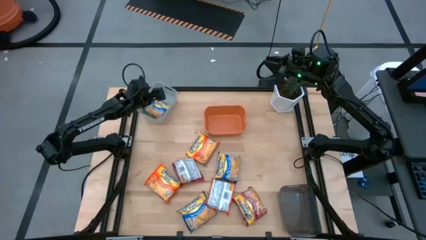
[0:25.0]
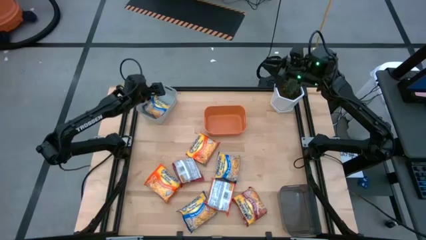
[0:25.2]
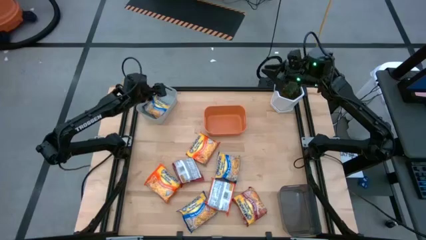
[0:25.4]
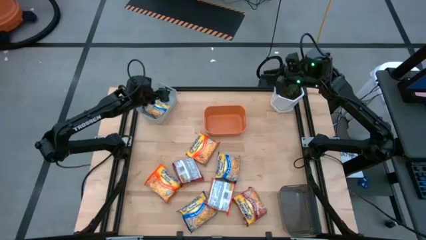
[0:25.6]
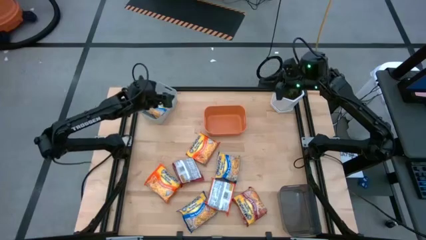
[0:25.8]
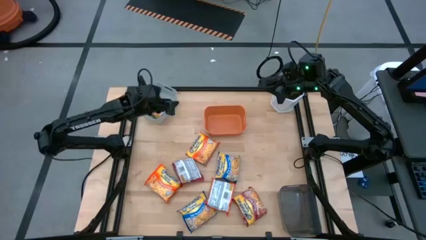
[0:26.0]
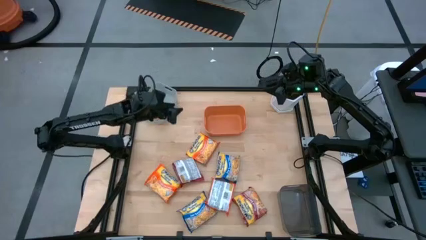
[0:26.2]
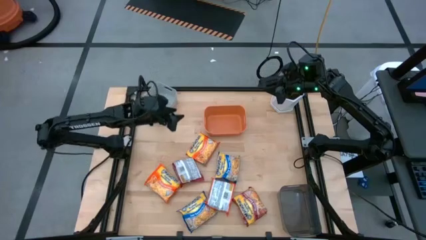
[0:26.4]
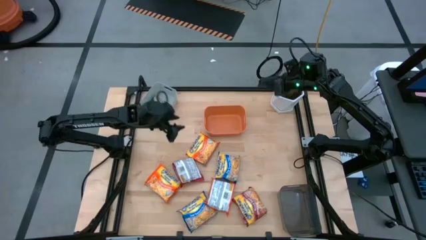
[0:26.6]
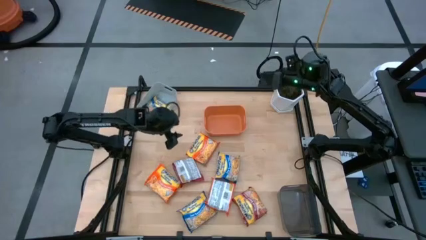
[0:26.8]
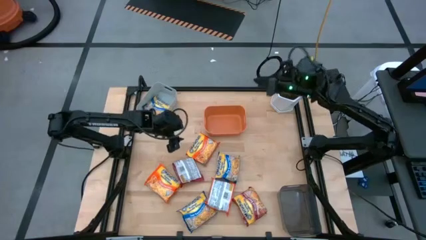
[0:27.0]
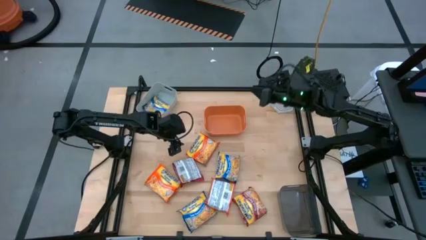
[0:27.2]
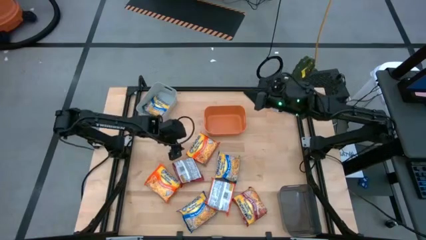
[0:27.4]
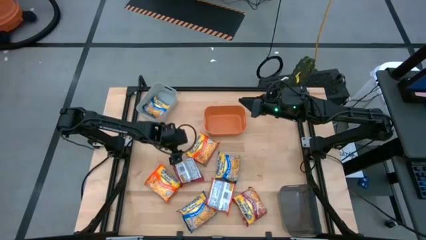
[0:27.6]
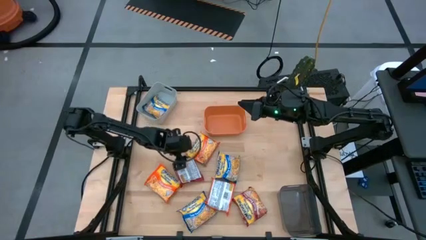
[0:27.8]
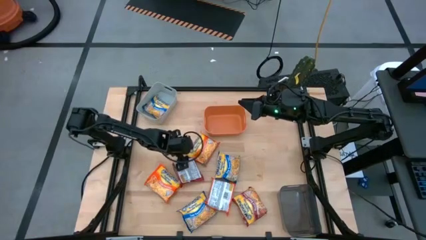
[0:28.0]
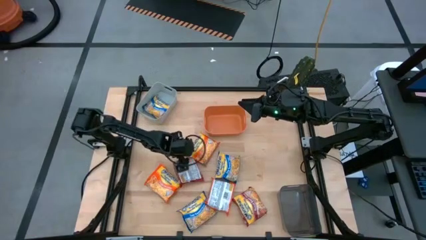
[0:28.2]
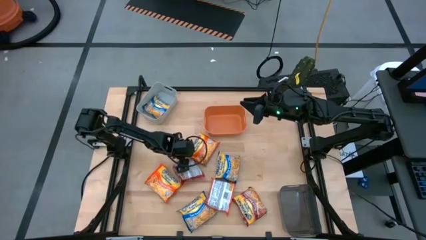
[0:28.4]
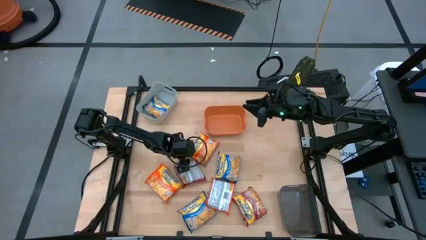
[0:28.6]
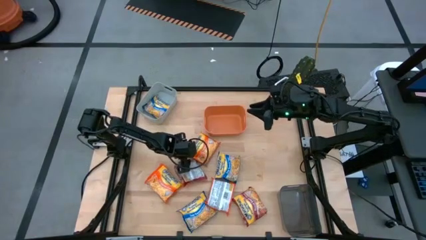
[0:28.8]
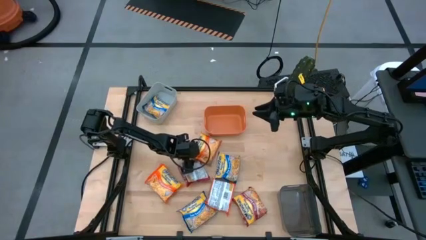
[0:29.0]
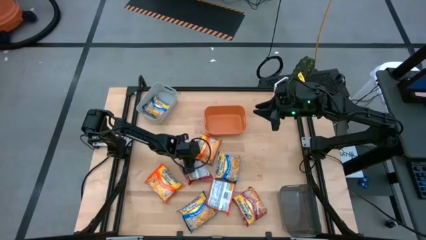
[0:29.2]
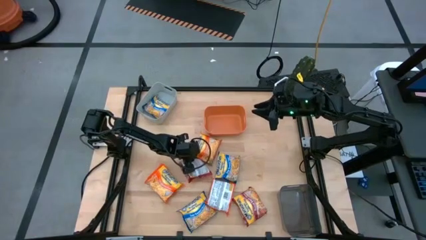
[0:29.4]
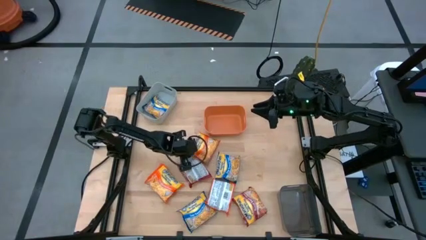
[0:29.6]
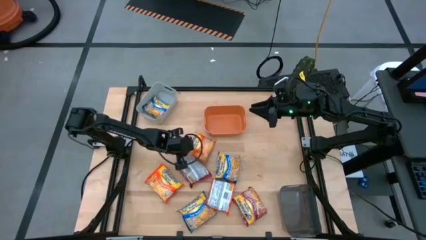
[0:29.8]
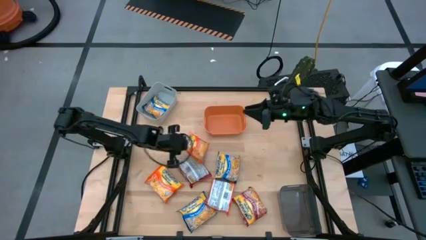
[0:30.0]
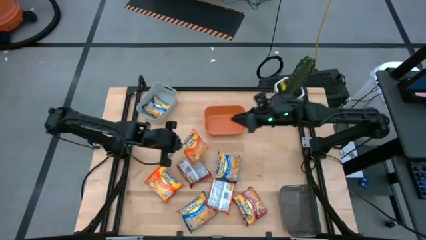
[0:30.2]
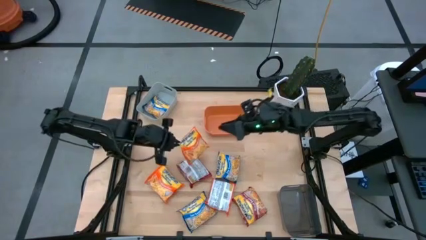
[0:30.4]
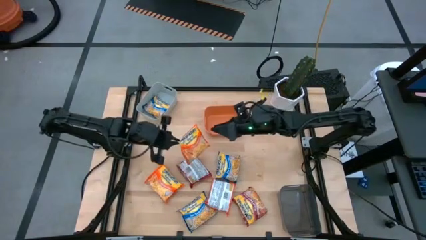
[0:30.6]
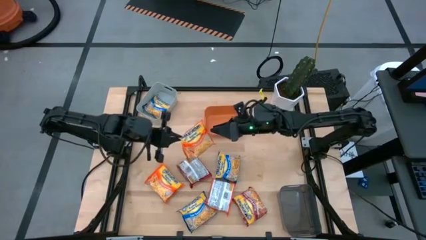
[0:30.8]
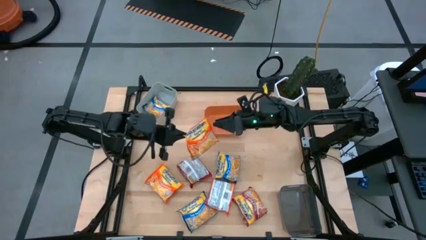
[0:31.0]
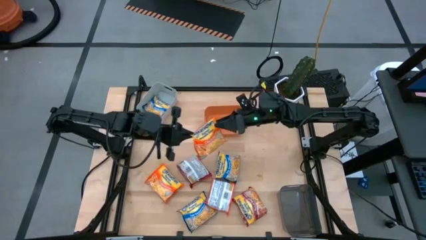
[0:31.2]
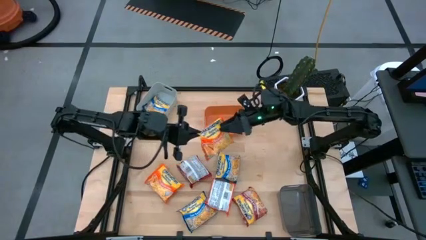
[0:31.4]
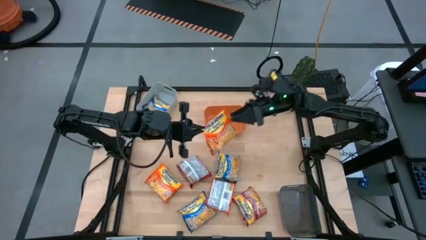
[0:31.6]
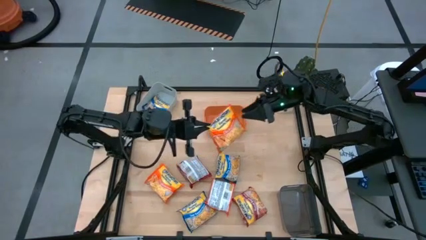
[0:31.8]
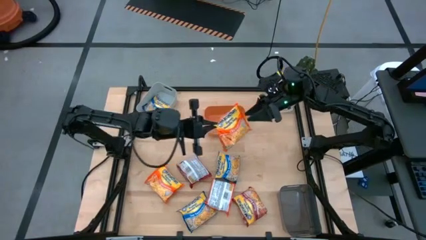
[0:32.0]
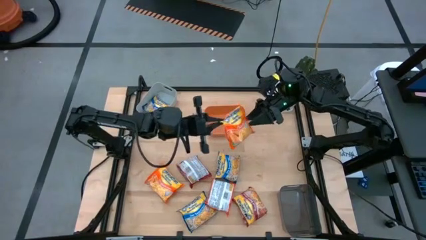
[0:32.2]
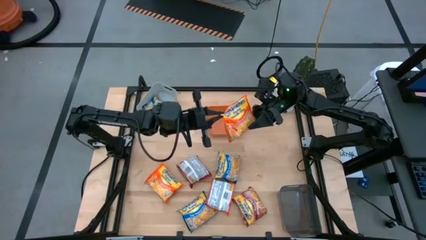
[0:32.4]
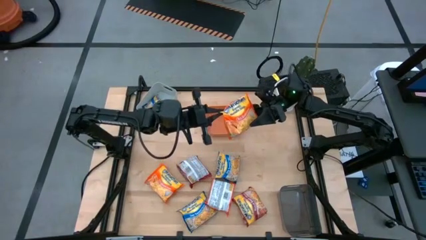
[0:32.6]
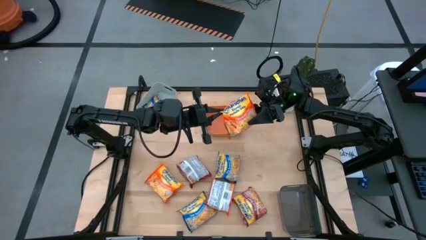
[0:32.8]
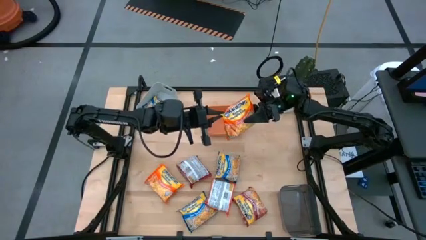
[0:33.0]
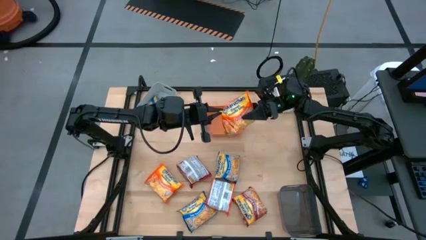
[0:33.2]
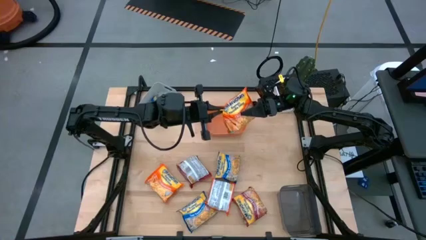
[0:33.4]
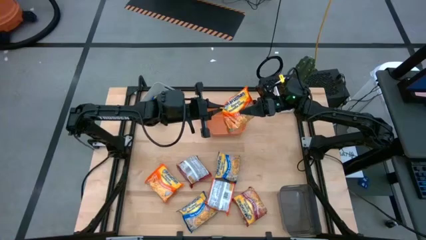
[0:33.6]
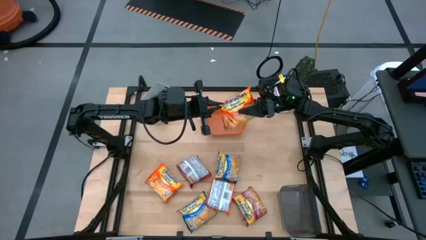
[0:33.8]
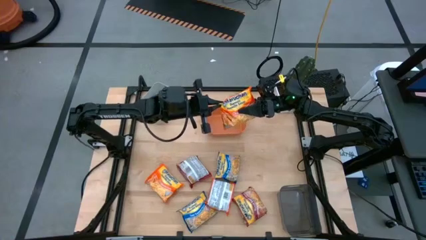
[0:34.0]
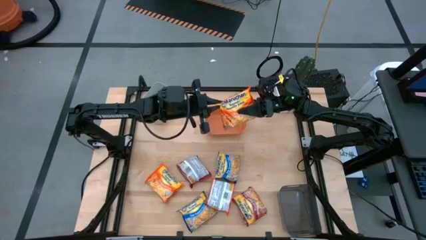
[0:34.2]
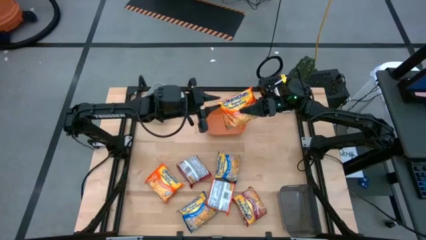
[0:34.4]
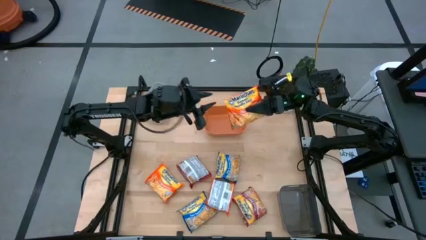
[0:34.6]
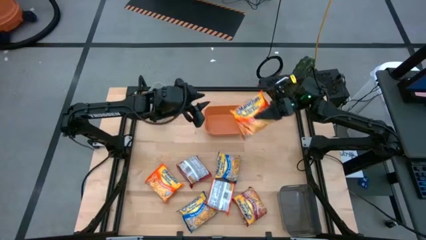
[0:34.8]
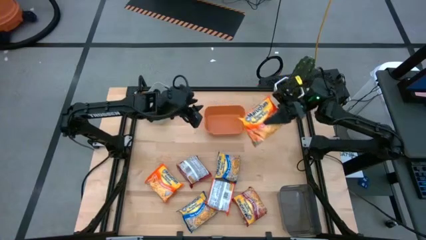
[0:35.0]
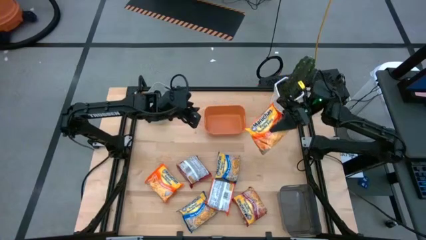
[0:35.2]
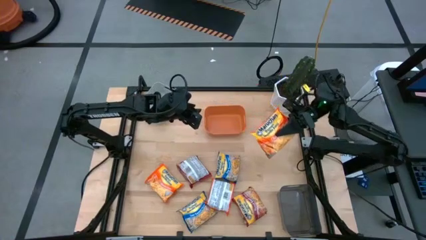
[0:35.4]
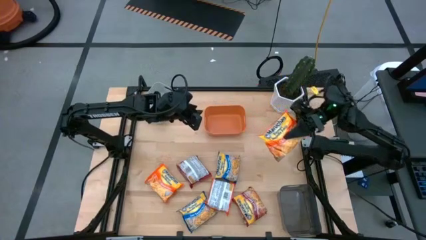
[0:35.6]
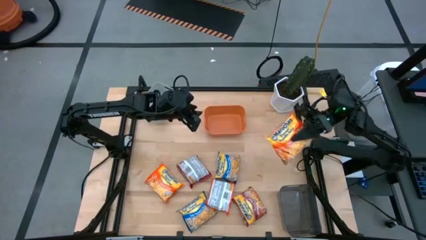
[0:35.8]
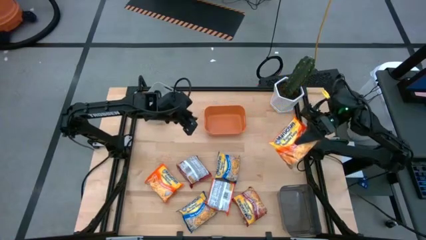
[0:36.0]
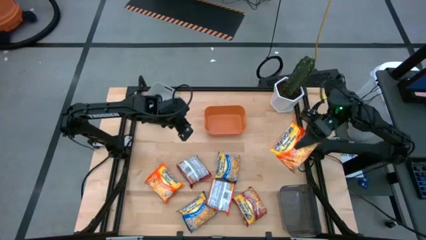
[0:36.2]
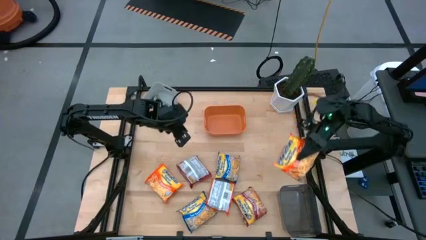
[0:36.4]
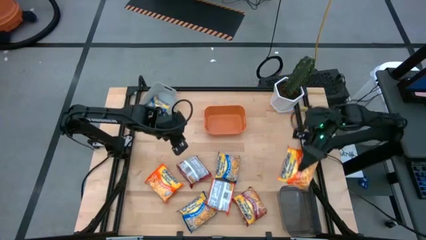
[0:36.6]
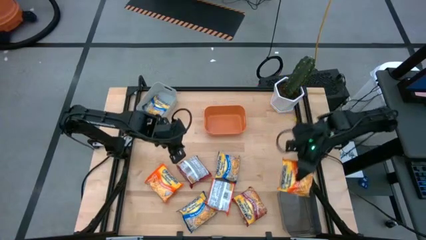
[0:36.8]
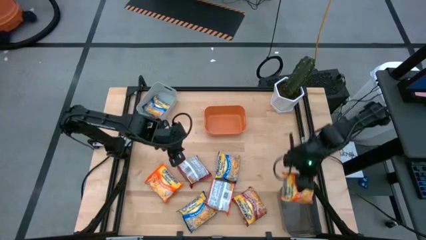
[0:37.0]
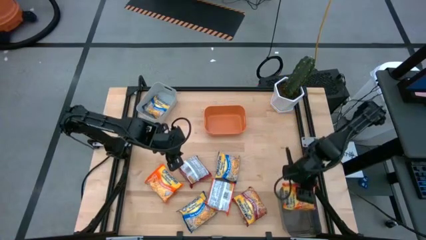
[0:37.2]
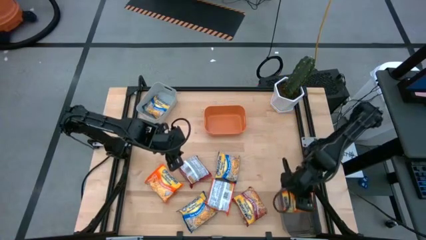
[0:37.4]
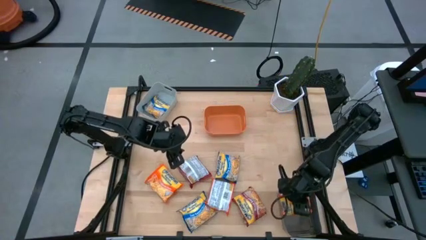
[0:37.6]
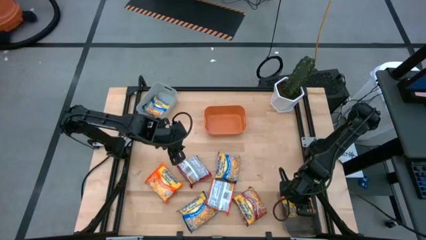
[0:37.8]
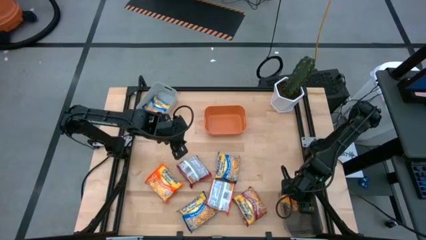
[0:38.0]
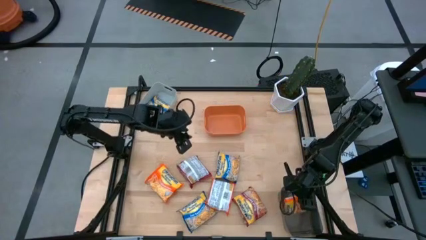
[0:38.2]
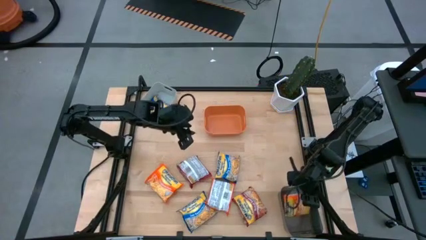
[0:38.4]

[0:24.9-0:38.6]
Task: Sort Maruchan noodles
Put the top orange noodle pack into the black bin
